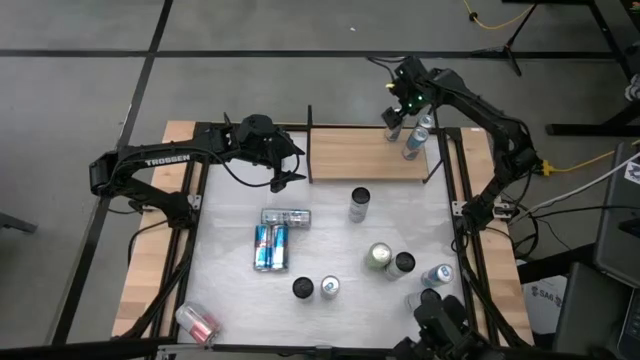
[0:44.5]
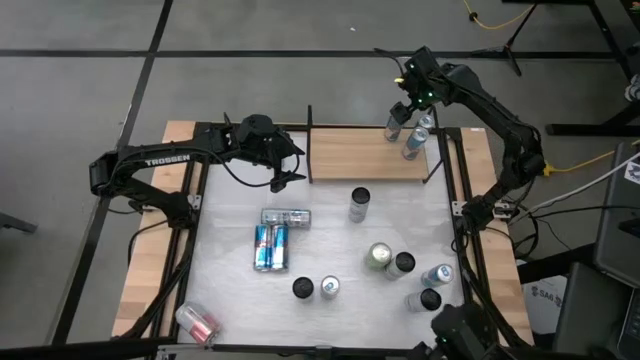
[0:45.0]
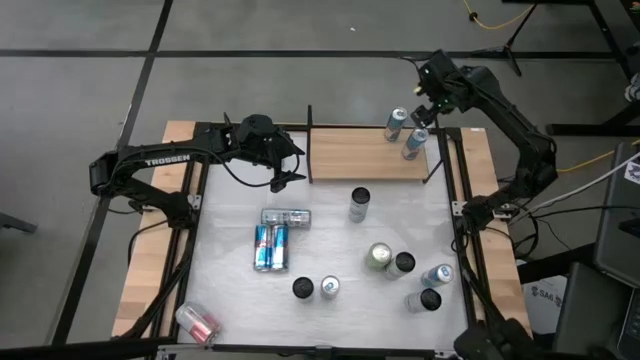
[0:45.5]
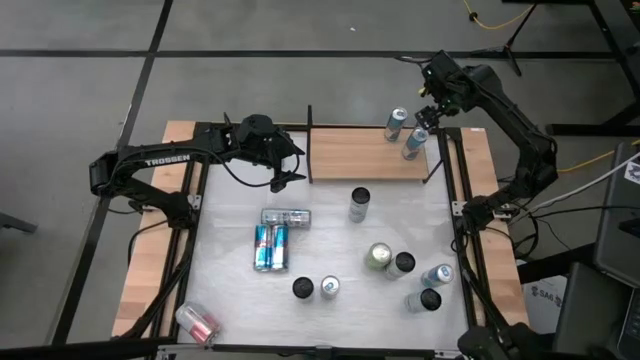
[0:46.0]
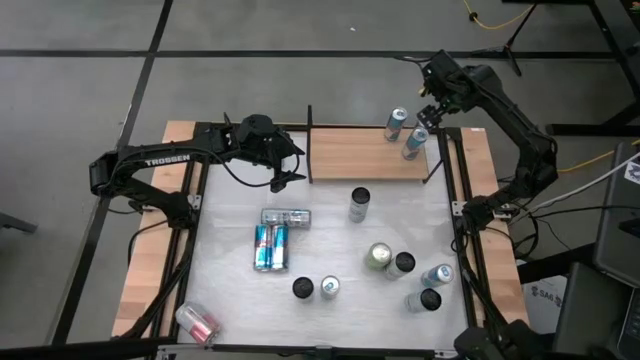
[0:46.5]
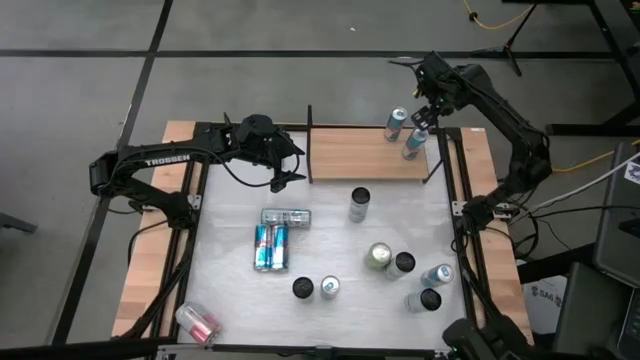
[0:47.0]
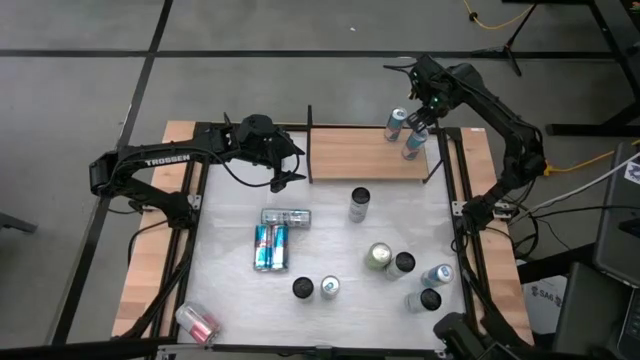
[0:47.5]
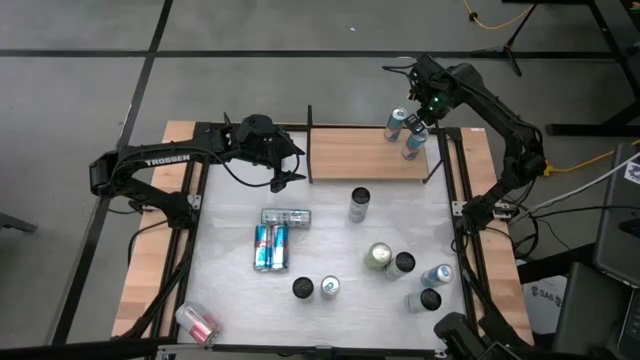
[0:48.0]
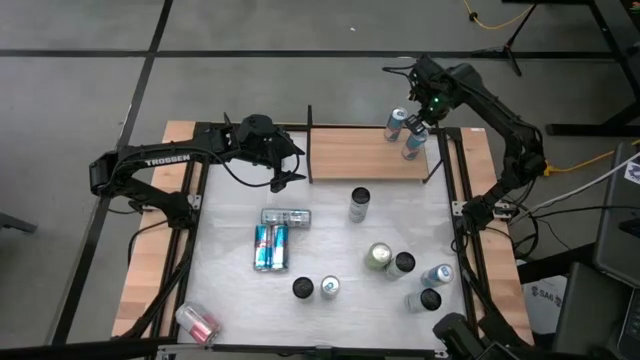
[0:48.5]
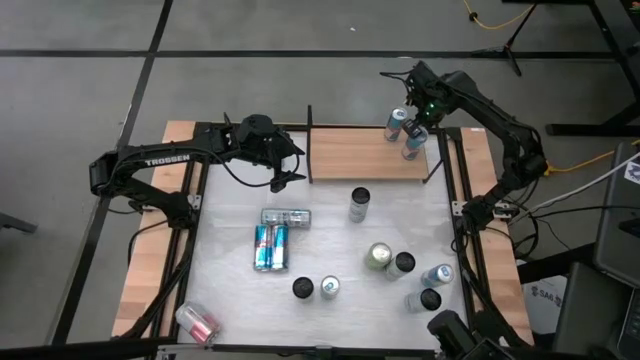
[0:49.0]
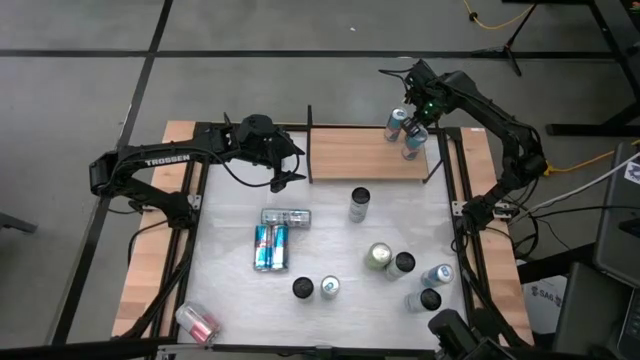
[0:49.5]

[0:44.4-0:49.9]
Task: Place canned beverage on shelf
Adjust the blue soda can

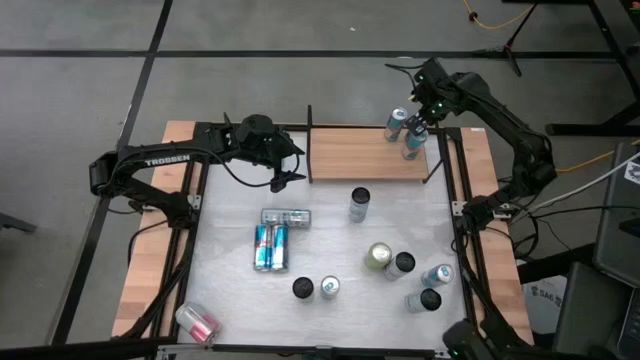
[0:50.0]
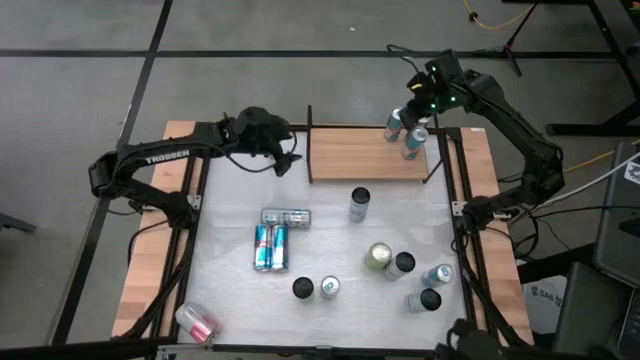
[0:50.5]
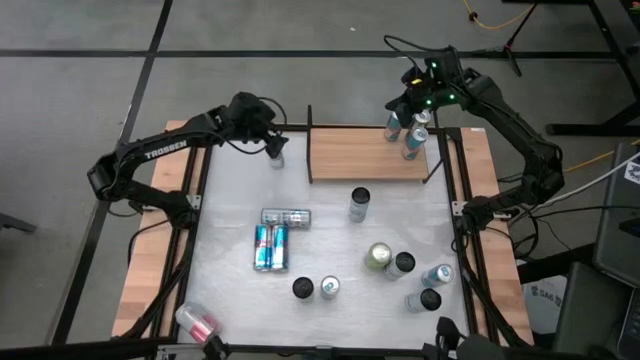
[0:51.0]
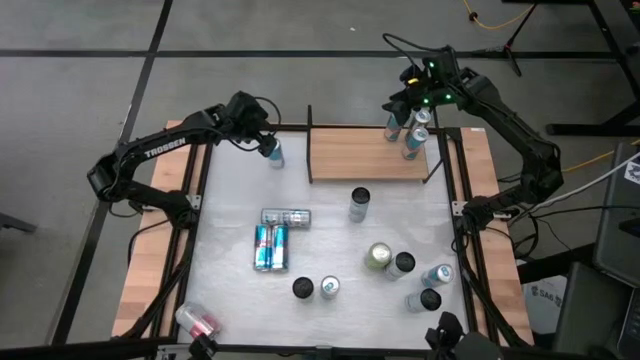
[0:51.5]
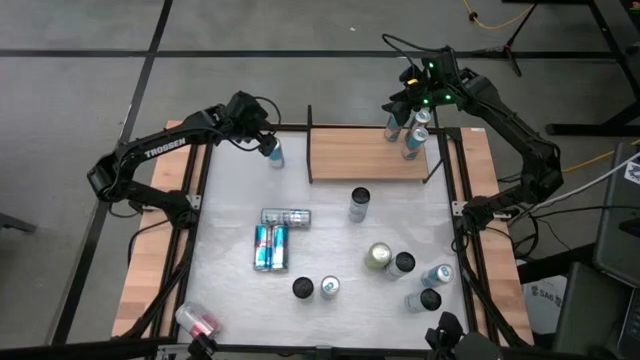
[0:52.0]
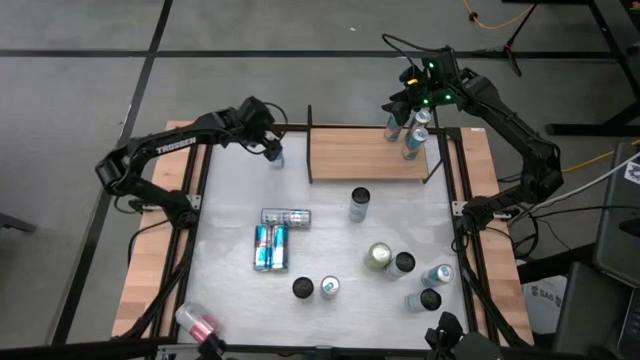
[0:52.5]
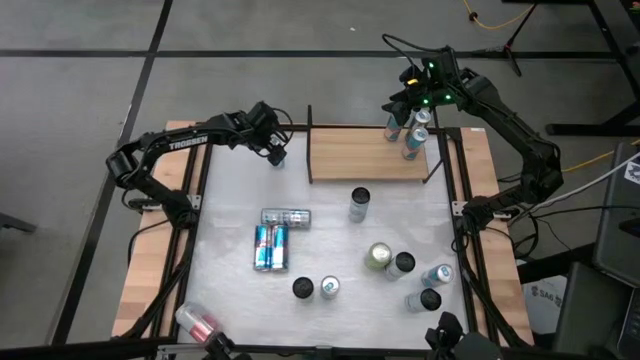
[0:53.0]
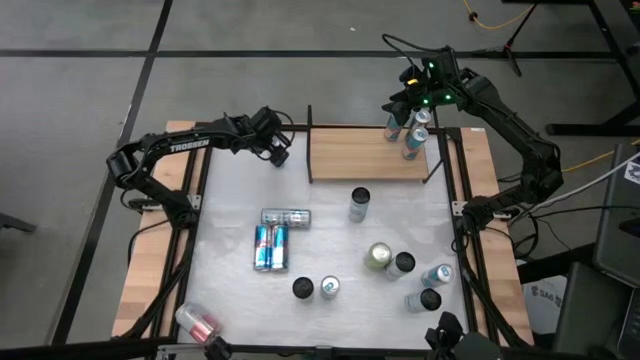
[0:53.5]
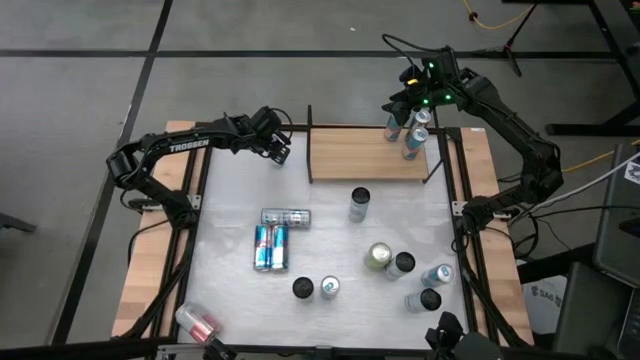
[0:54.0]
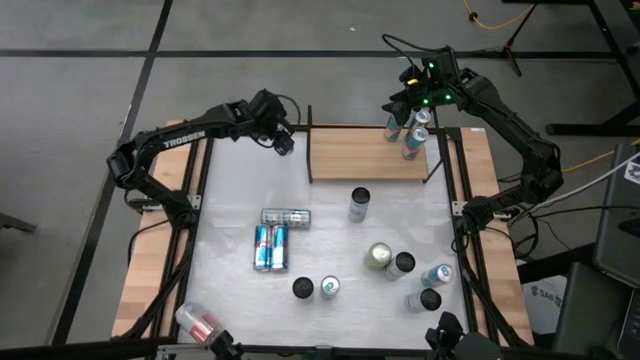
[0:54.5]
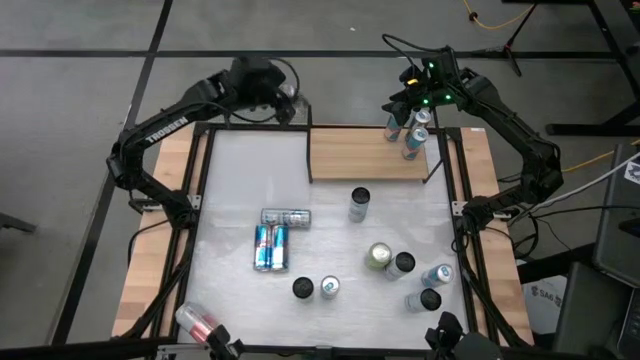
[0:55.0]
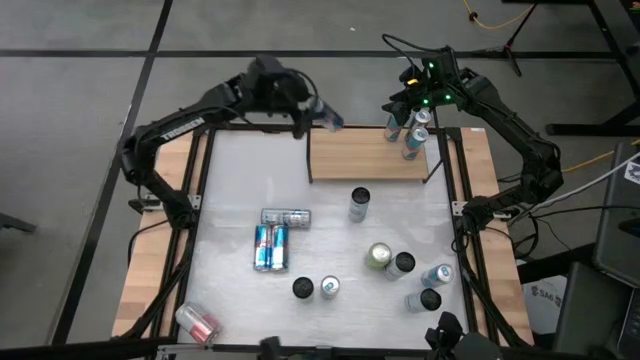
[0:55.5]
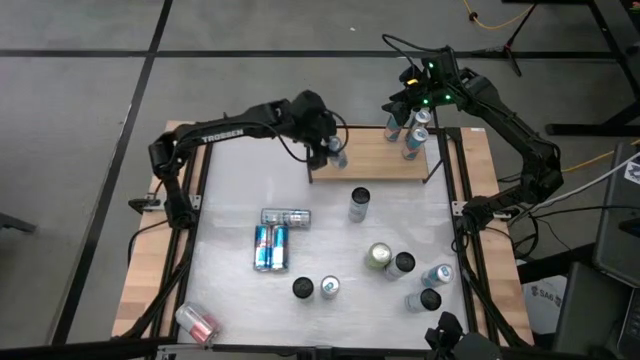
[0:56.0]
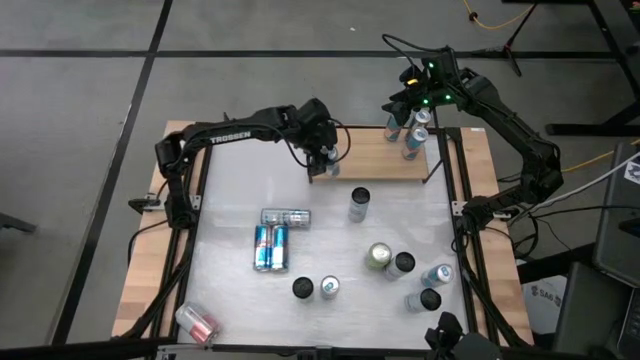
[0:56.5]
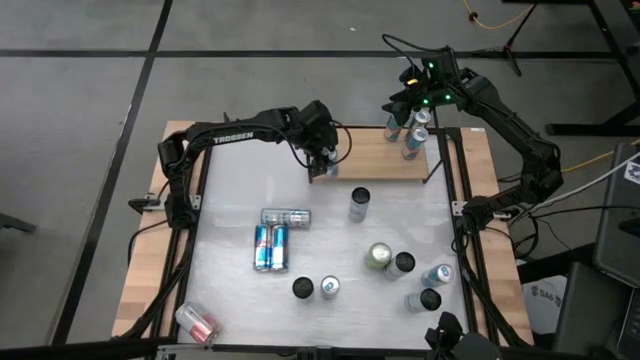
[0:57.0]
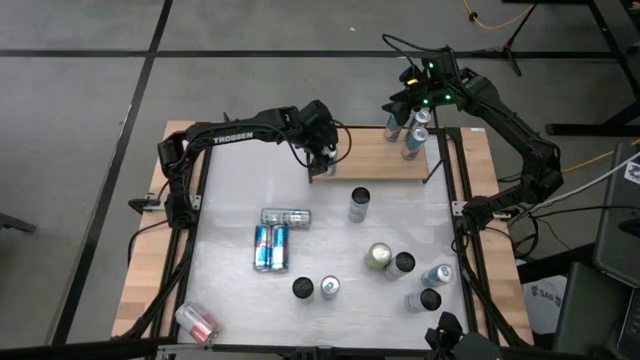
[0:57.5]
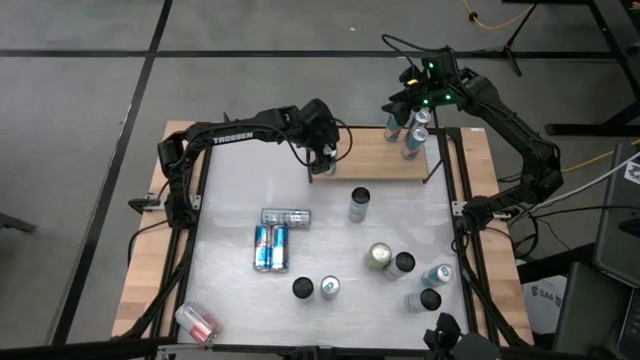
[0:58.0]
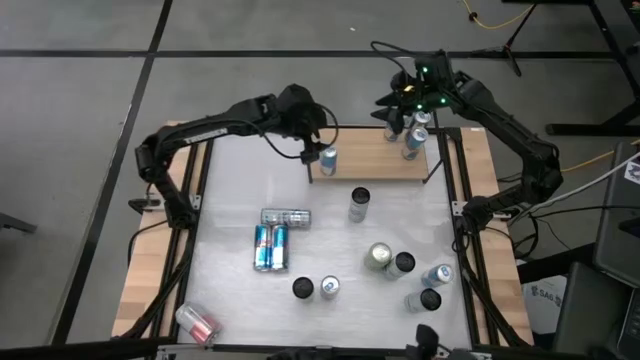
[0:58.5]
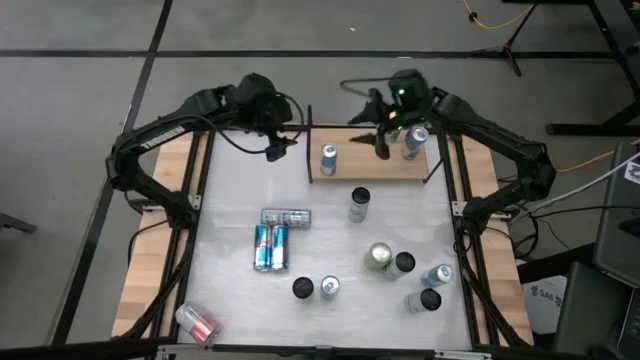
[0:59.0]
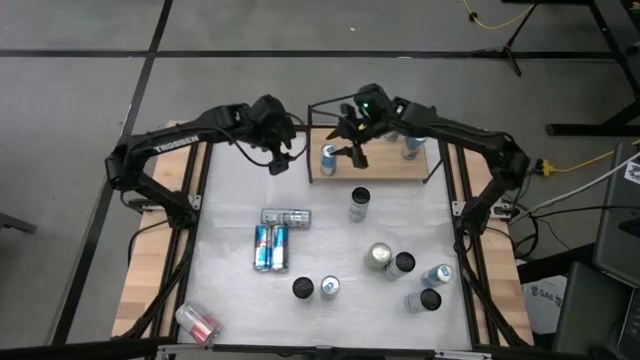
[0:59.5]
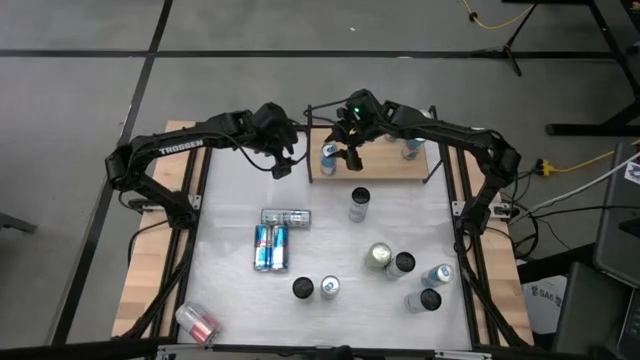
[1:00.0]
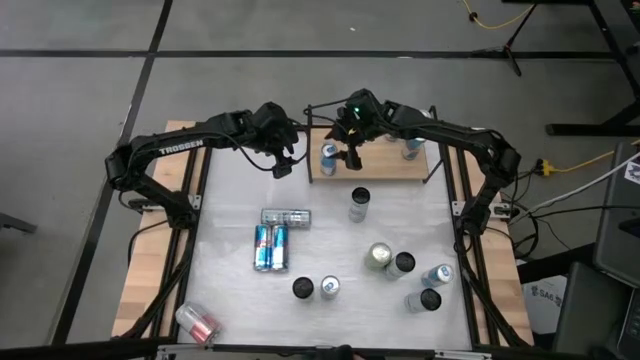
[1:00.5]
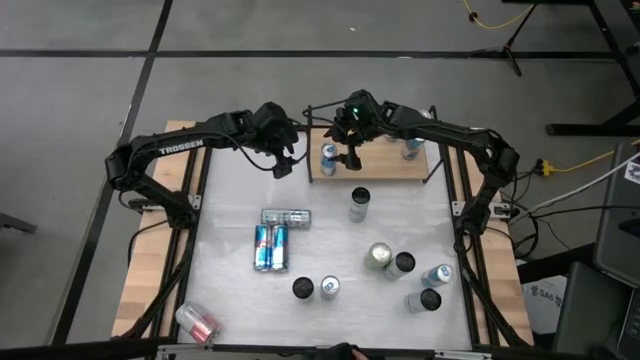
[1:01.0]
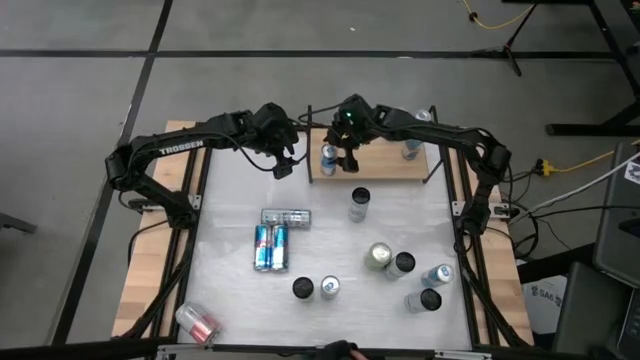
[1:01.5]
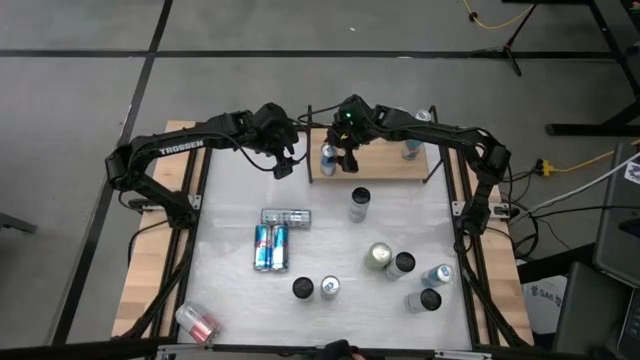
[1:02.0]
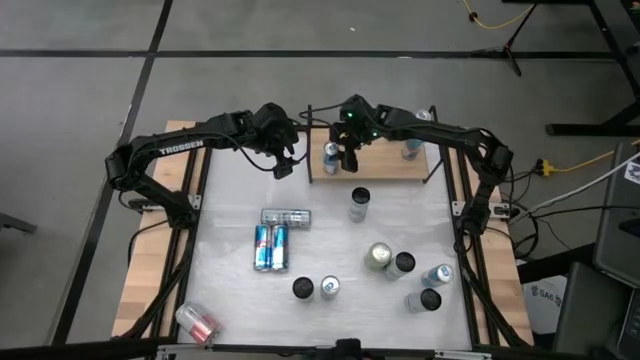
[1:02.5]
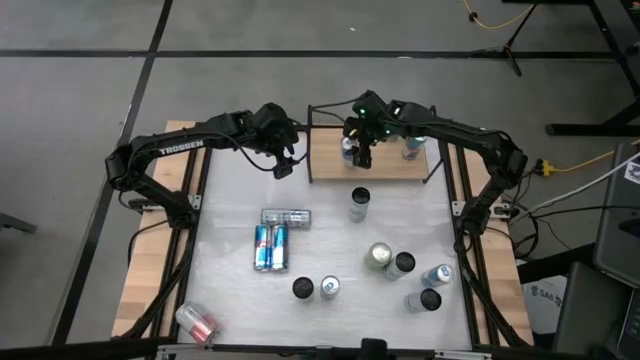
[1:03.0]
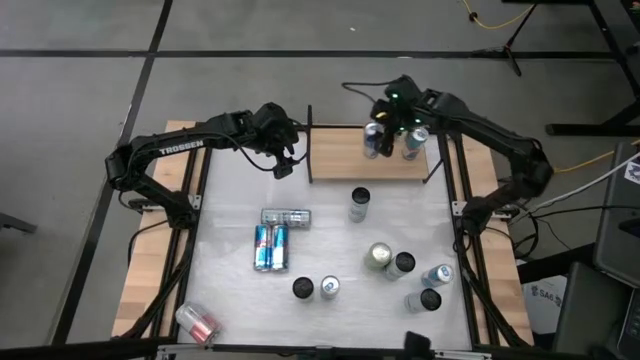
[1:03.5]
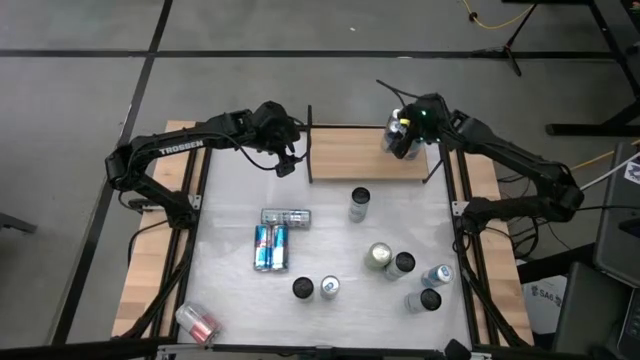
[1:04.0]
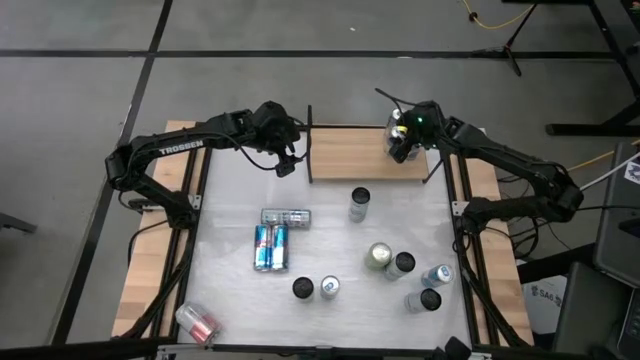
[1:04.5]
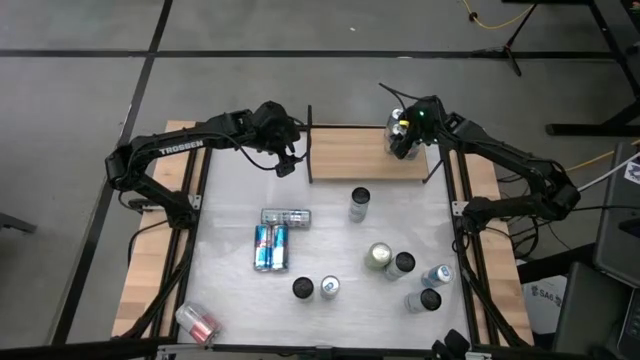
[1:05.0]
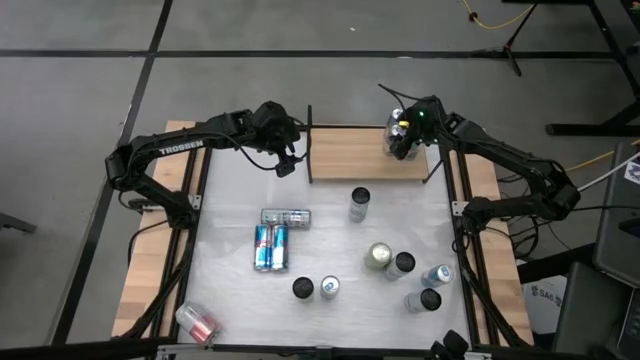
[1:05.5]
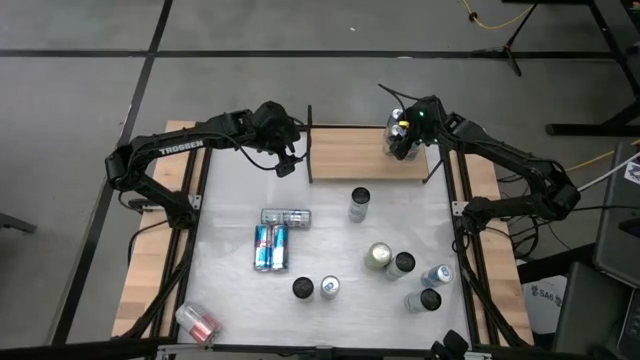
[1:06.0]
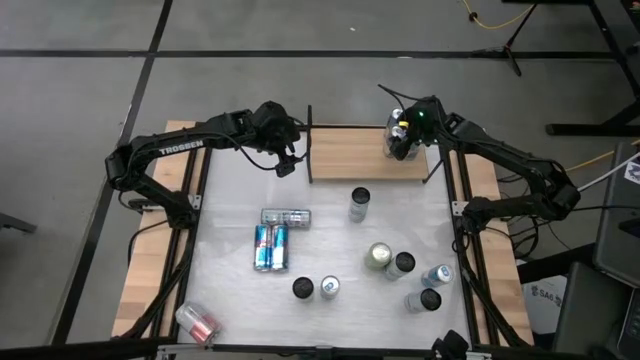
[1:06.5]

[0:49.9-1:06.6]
Put the blue soda can on the shelf aligned with the other blue soda cans
